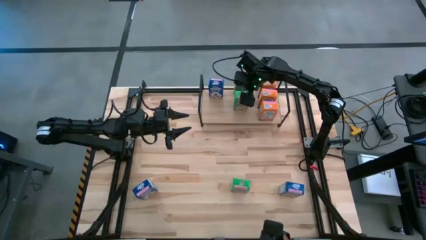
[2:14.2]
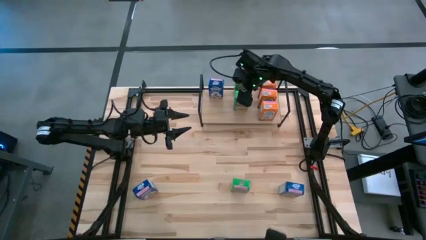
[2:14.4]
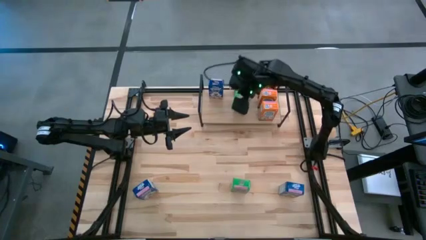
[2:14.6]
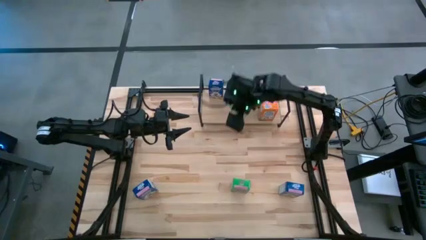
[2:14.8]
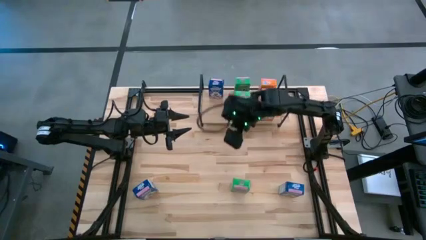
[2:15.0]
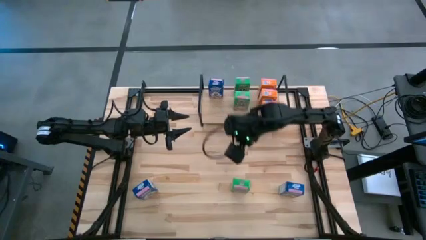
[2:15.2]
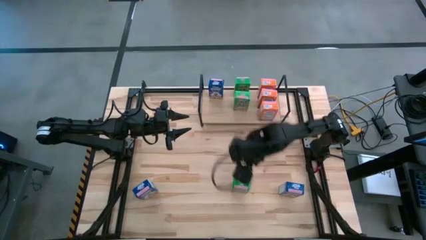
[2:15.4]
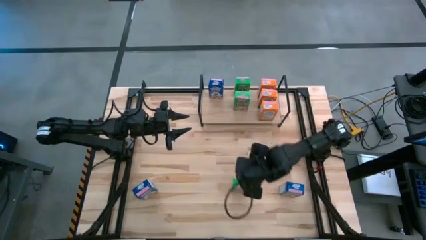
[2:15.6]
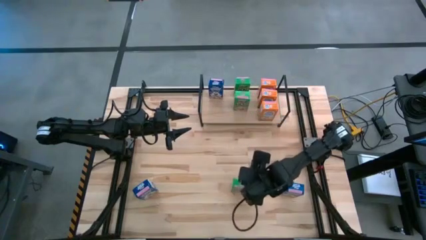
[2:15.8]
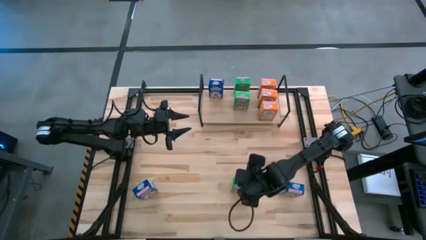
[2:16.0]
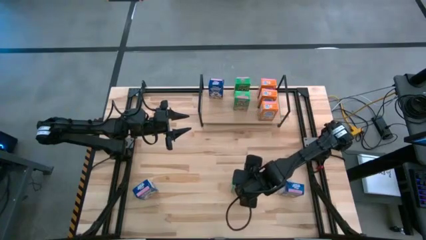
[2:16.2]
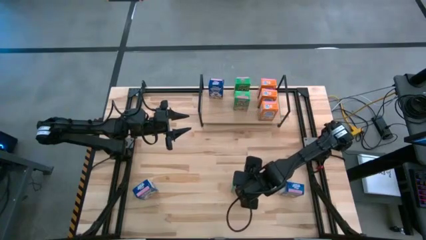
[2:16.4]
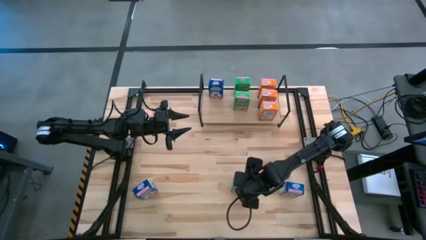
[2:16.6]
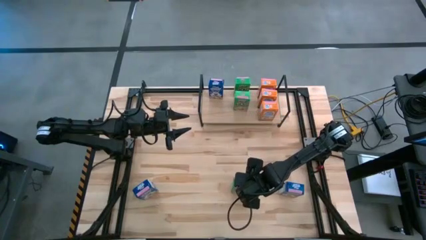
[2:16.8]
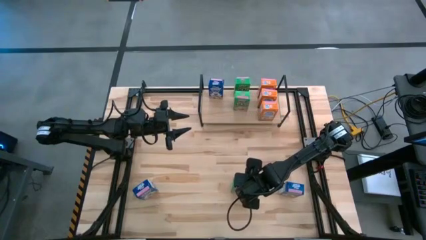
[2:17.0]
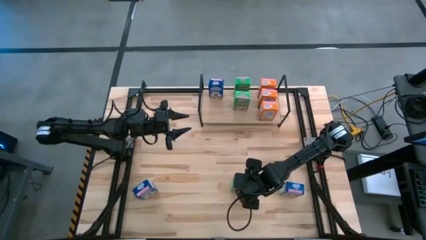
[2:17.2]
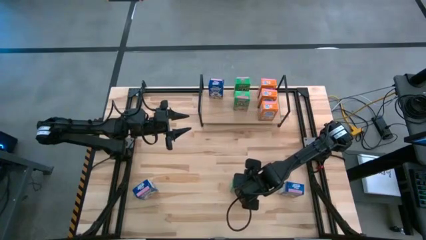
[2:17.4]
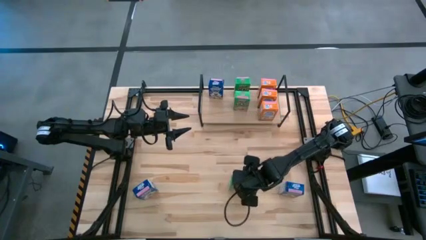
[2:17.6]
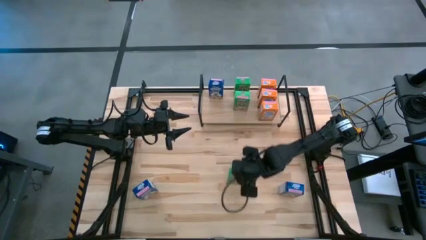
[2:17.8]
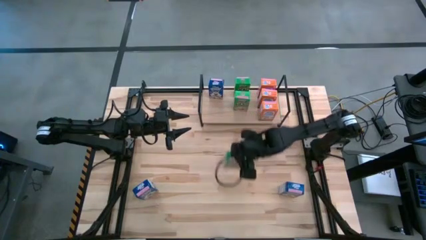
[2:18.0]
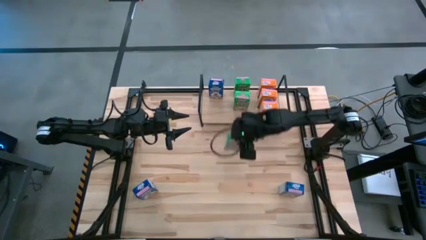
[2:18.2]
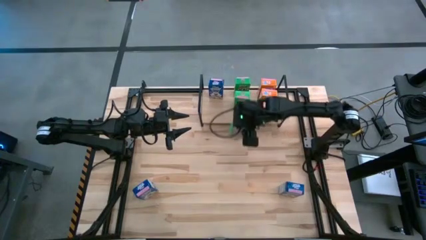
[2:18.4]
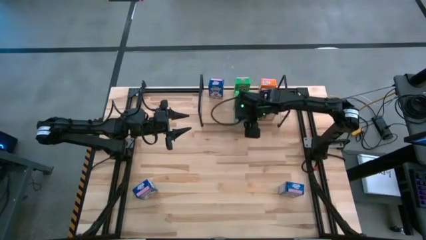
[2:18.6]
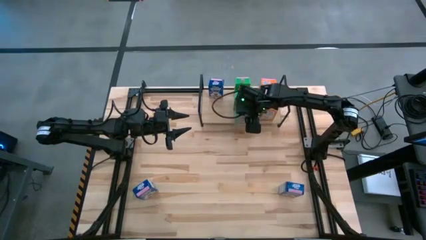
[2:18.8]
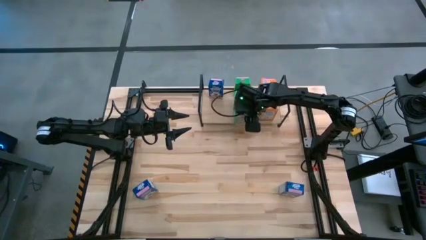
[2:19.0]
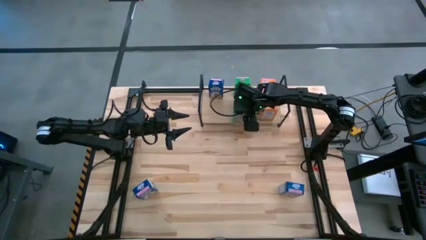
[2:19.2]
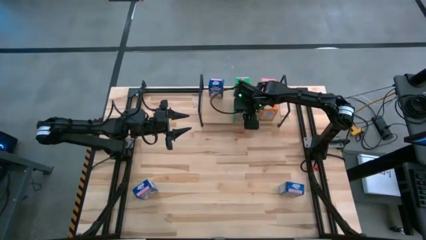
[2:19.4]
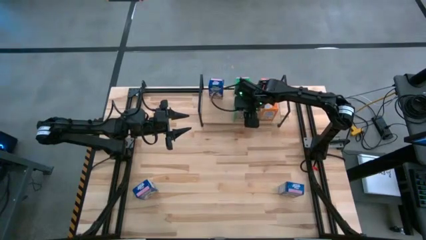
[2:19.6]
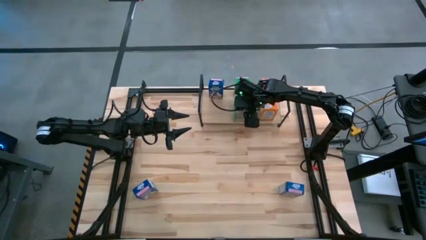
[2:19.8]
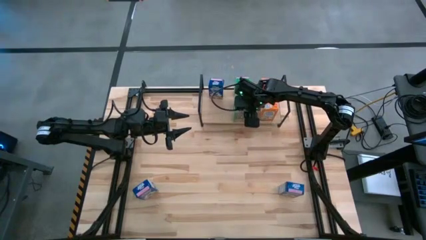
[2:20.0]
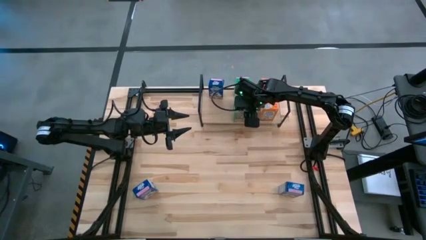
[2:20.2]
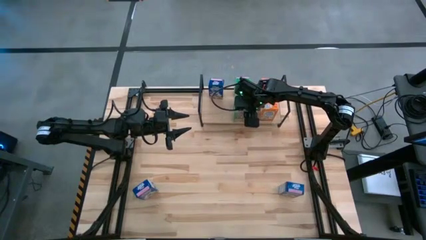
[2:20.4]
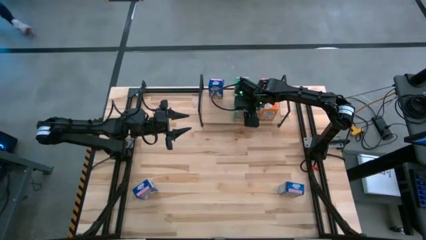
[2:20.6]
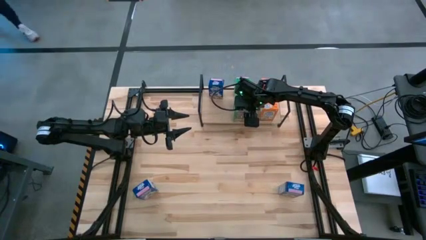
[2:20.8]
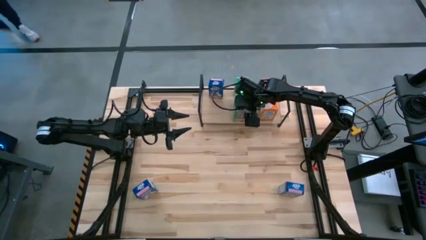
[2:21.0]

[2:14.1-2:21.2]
Task: Stack cereal on shelf
Put the green cereal box aligned with the other green cereal boxes on the shelf

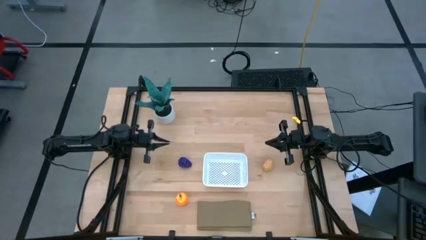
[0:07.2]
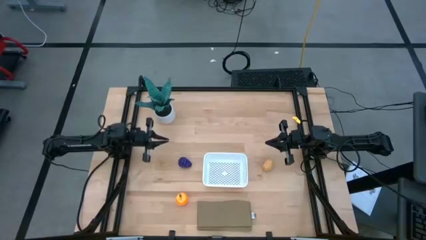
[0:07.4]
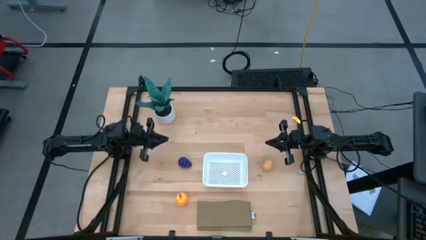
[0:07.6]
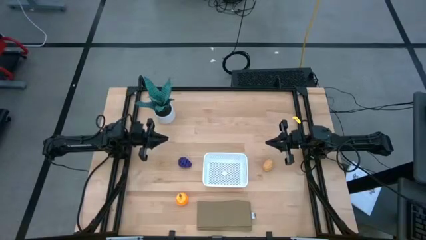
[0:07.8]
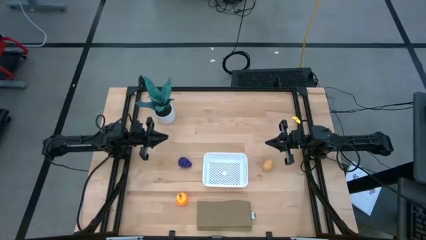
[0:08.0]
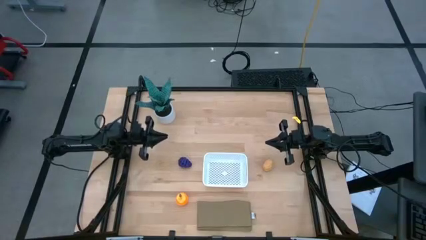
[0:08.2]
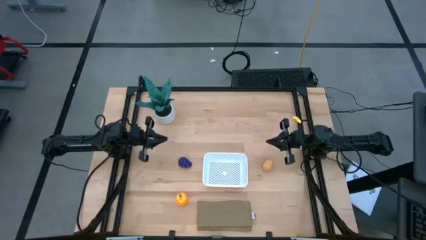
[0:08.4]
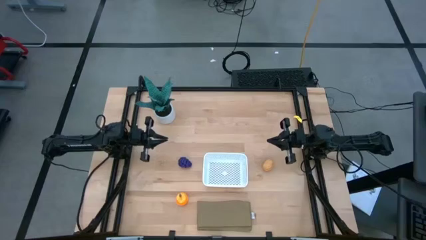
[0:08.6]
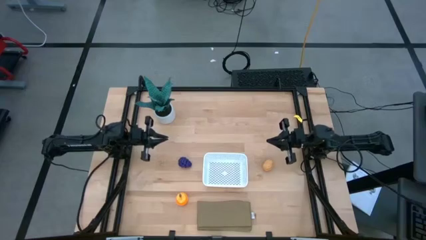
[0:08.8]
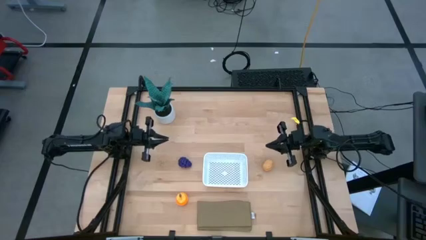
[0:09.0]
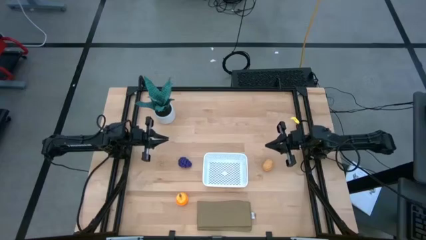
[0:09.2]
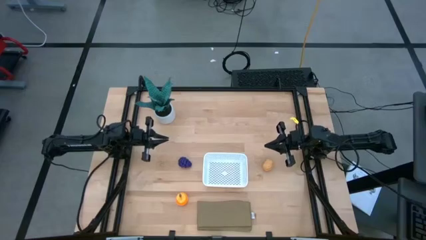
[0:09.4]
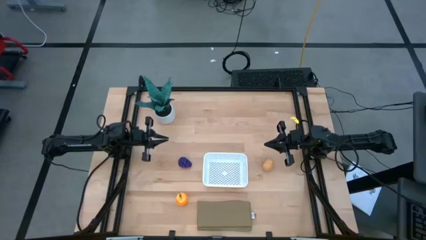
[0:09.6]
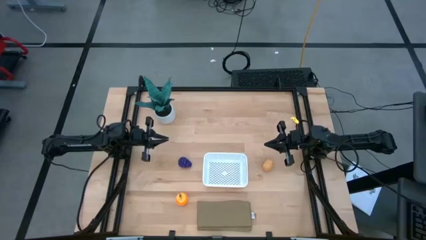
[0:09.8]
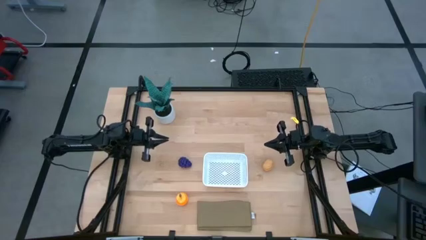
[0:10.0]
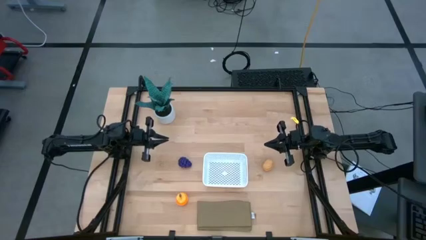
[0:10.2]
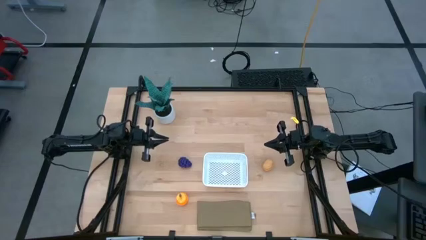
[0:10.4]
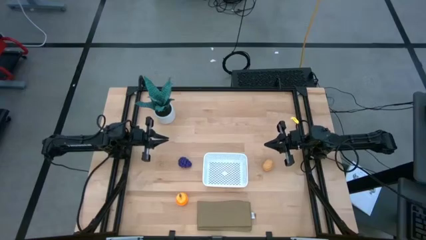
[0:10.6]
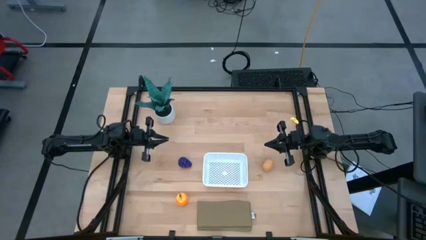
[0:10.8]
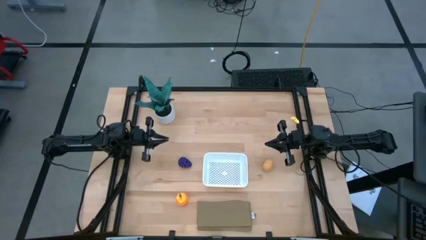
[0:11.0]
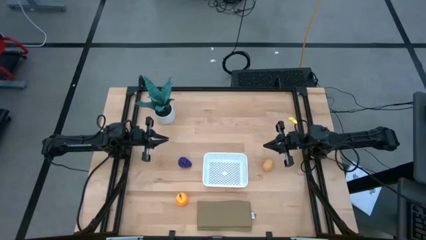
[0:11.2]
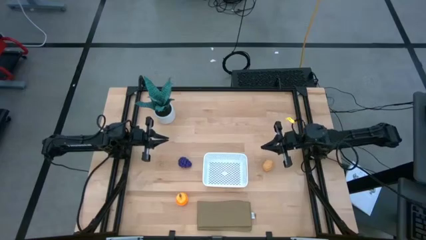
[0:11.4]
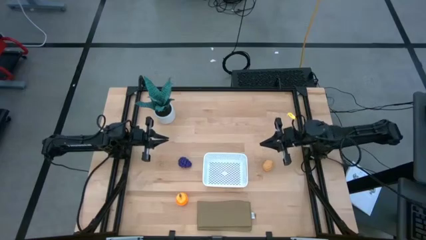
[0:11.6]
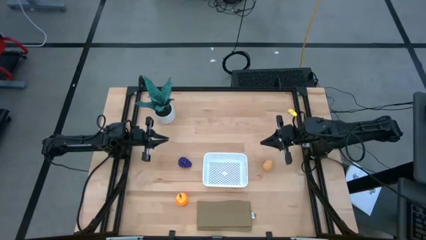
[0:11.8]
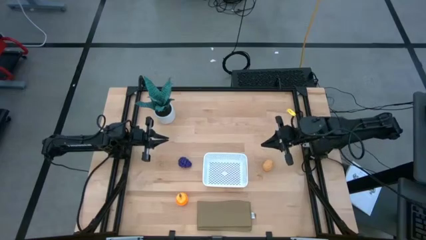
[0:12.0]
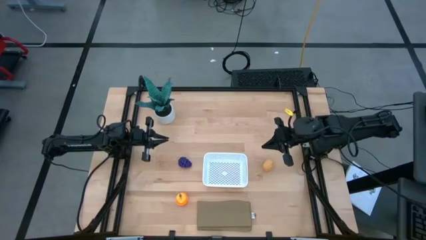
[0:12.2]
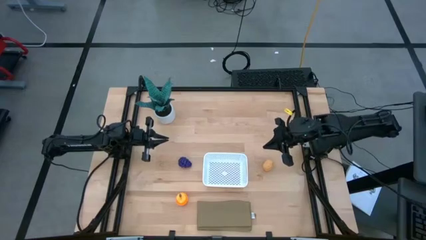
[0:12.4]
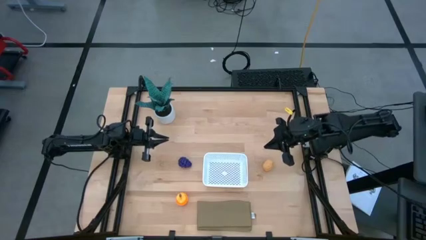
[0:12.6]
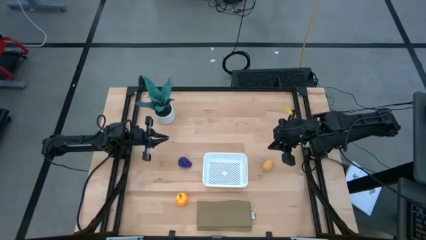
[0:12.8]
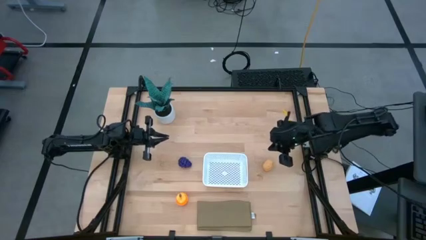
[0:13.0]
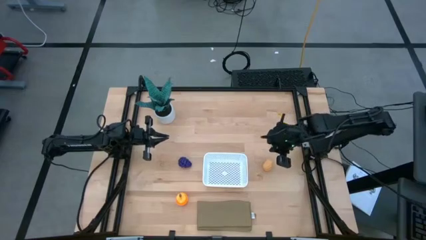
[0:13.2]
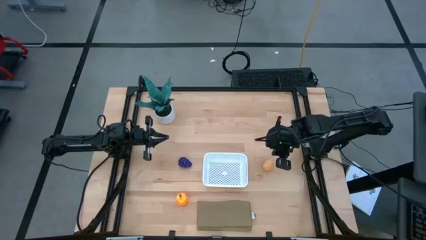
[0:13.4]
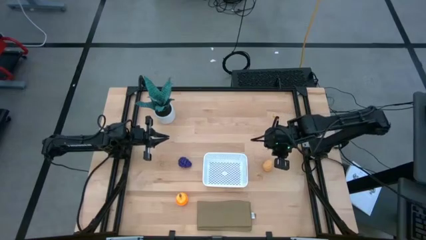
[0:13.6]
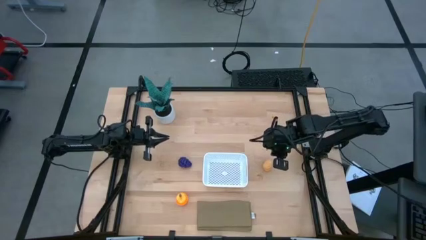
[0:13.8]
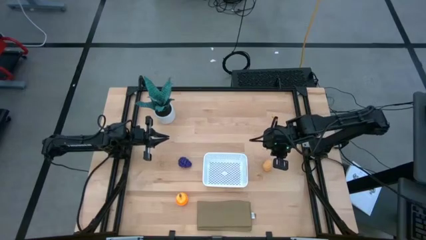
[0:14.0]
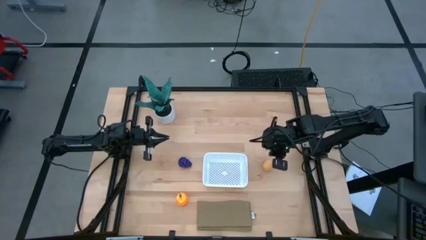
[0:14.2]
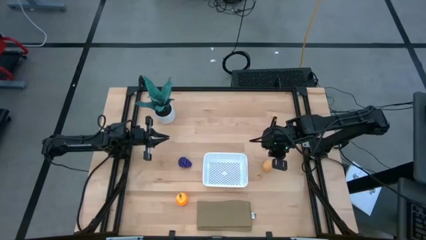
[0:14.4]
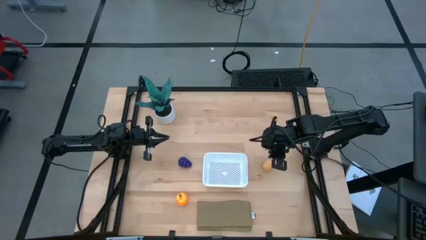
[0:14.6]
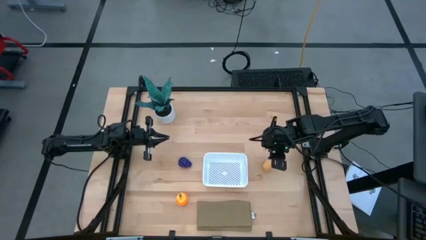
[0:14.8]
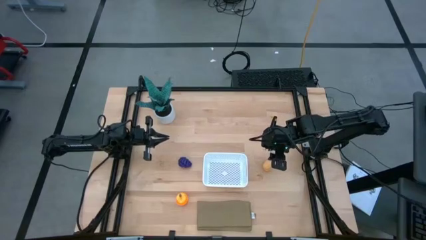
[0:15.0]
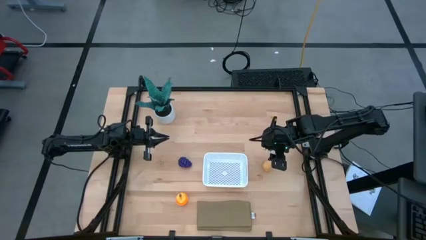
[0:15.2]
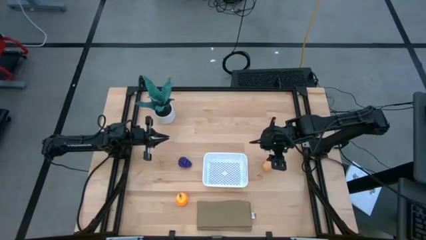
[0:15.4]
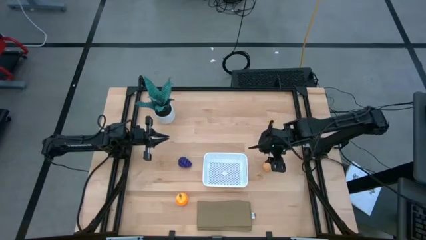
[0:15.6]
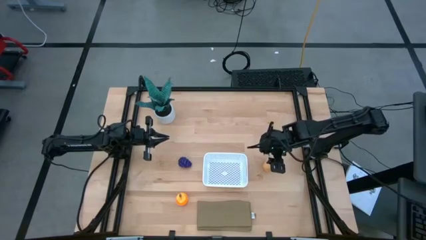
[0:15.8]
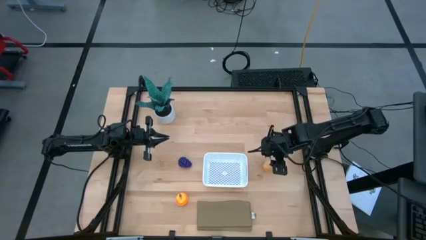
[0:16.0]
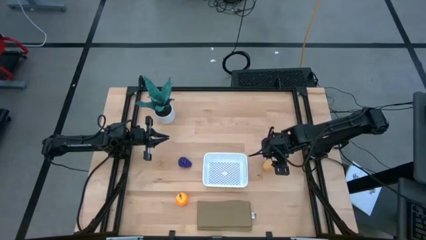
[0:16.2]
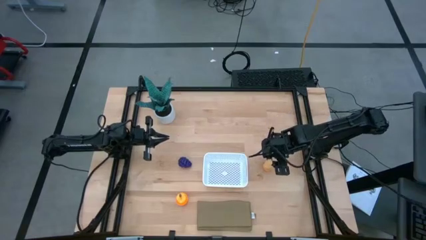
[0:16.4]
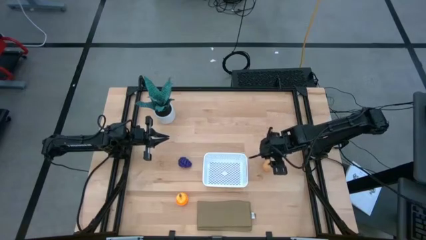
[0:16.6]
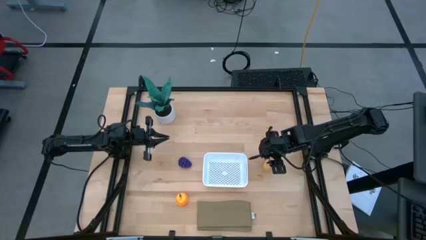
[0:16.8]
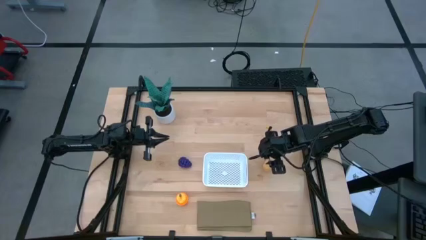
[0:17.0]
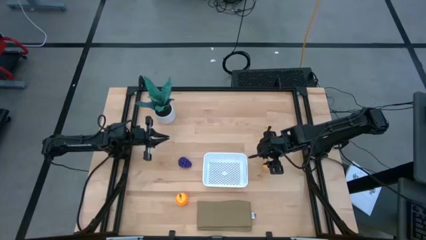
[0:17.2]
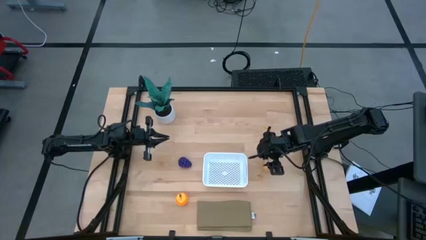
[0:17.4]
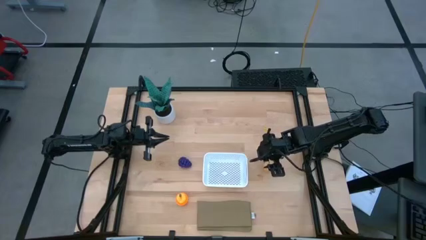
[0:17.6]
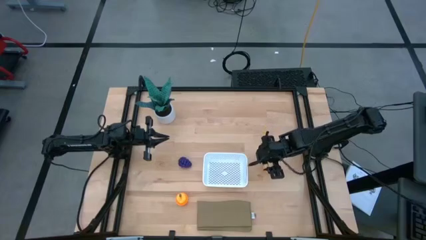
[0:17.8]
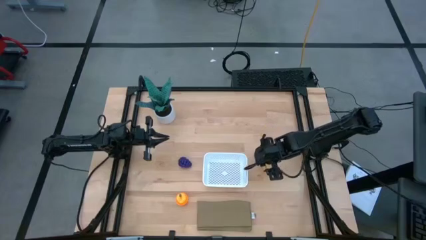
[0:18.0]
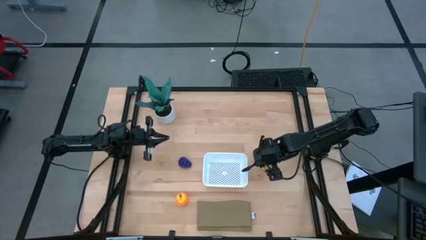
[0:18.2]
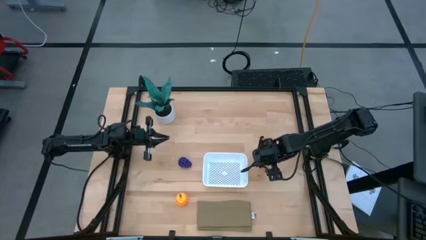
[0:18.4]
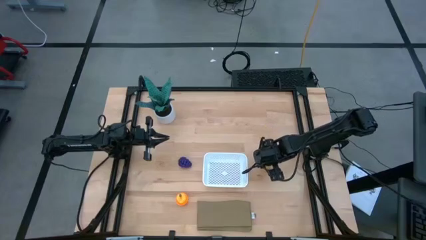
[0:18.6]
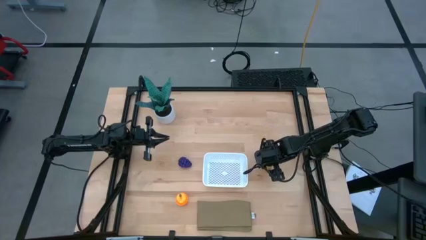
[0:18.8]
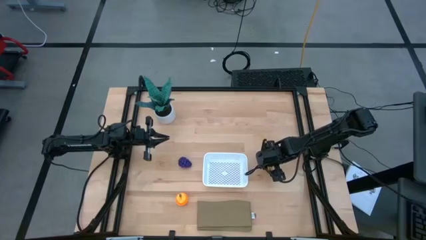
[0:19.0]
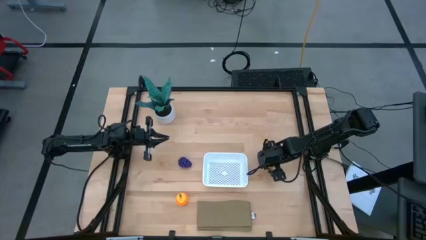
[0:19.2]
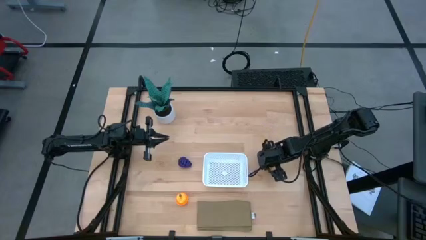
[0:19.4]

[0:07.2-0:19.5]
Task: Pick and placing Produce into tupperware
Put the potato into the white basket
